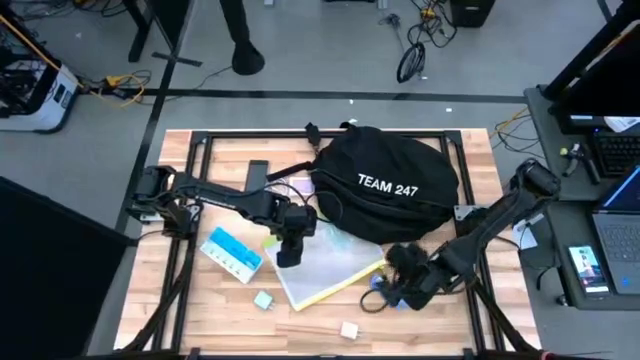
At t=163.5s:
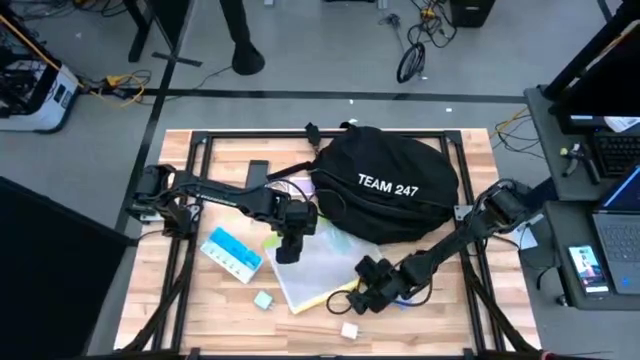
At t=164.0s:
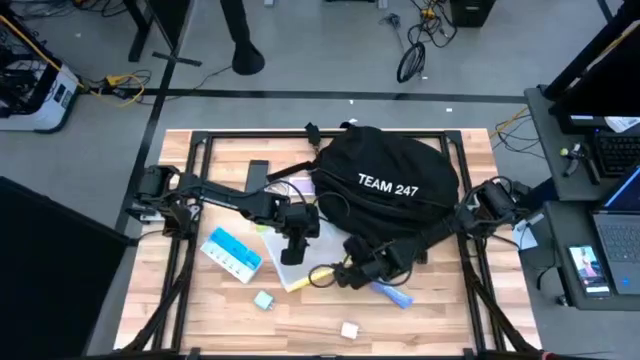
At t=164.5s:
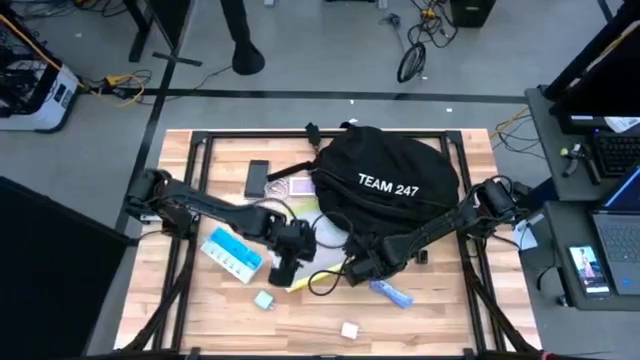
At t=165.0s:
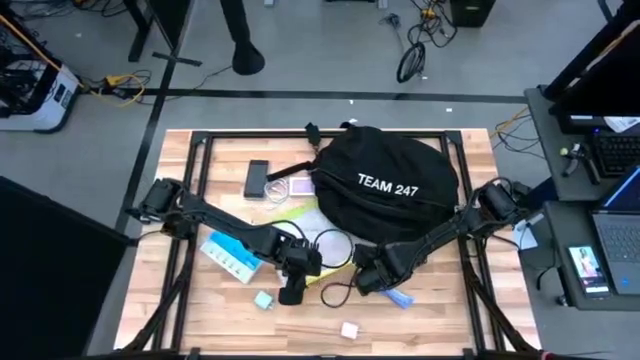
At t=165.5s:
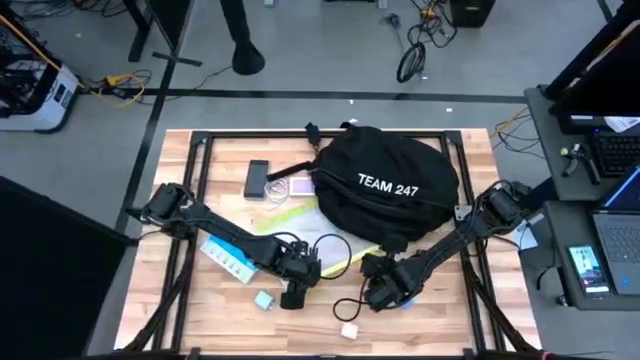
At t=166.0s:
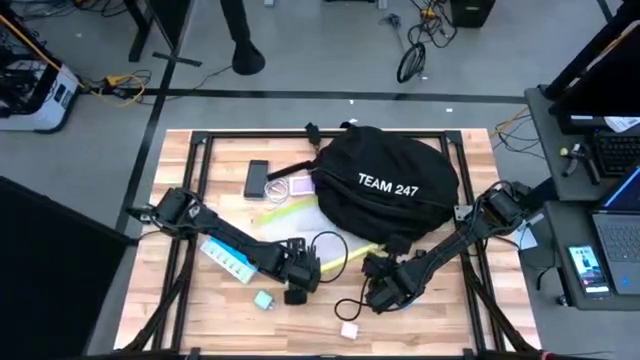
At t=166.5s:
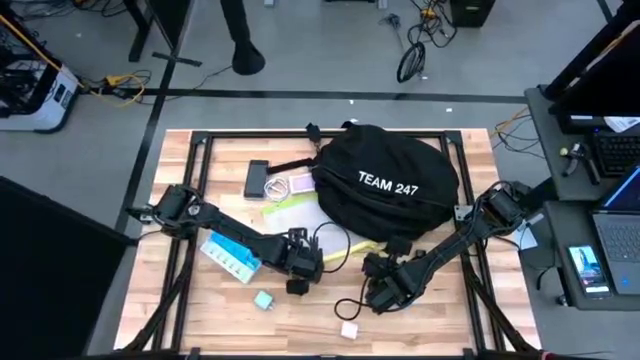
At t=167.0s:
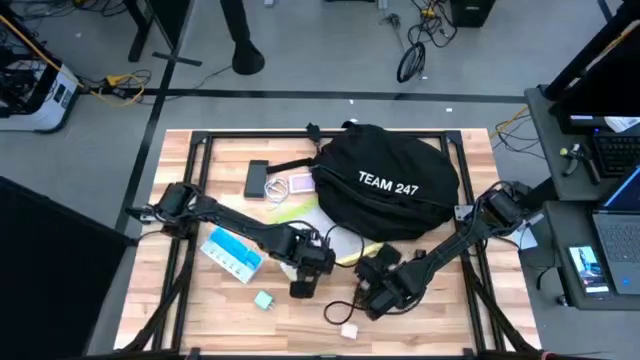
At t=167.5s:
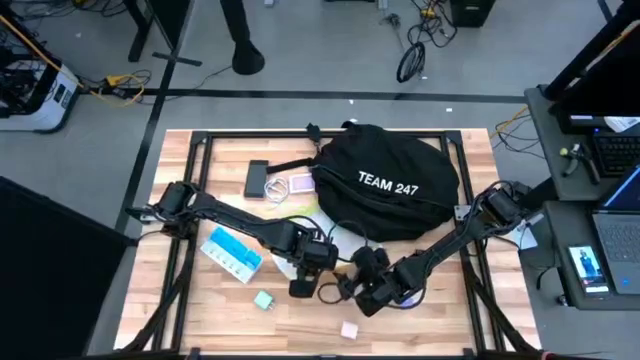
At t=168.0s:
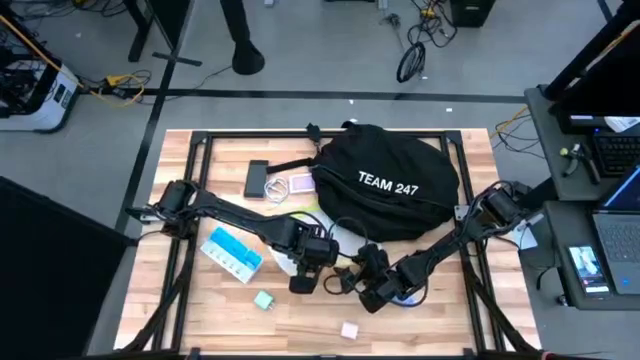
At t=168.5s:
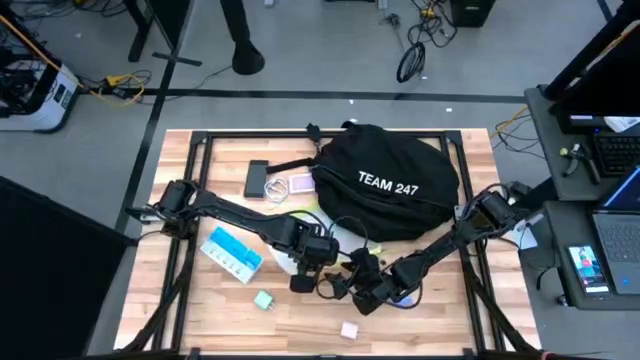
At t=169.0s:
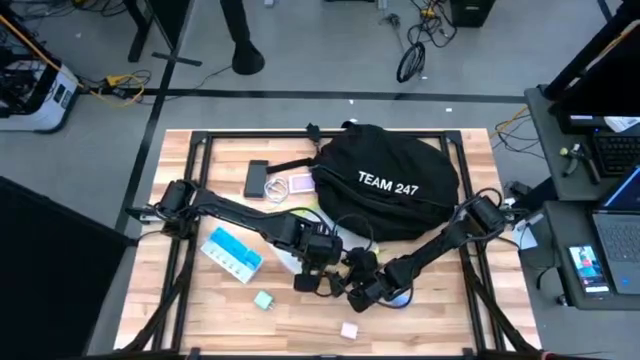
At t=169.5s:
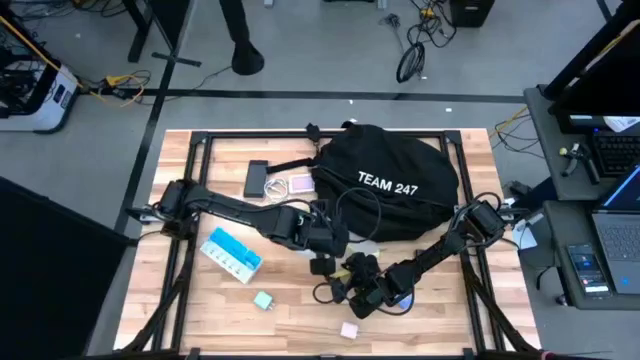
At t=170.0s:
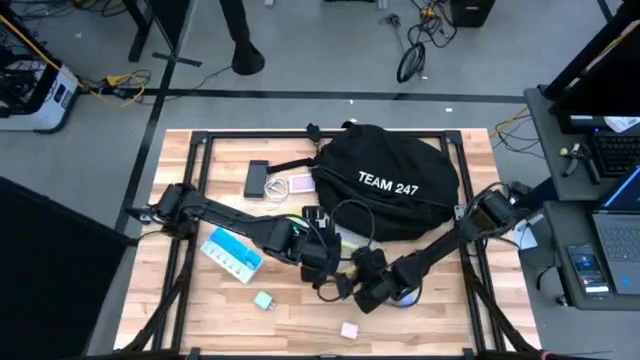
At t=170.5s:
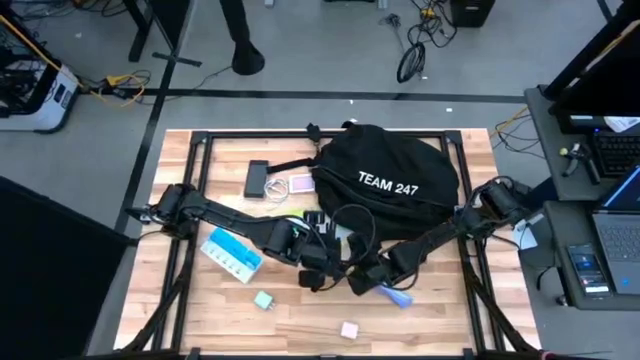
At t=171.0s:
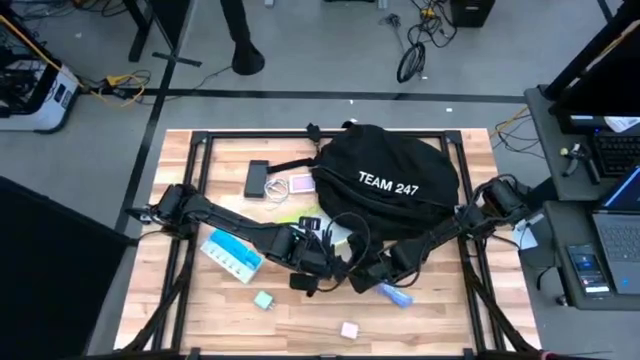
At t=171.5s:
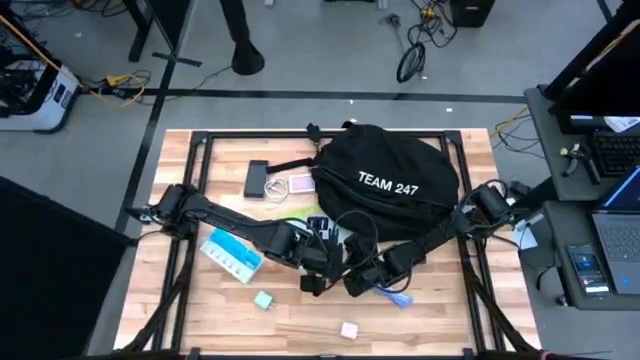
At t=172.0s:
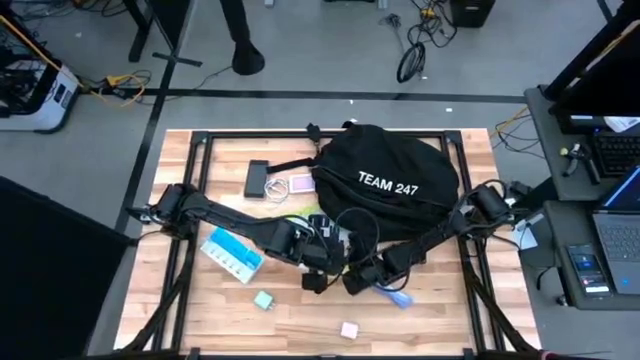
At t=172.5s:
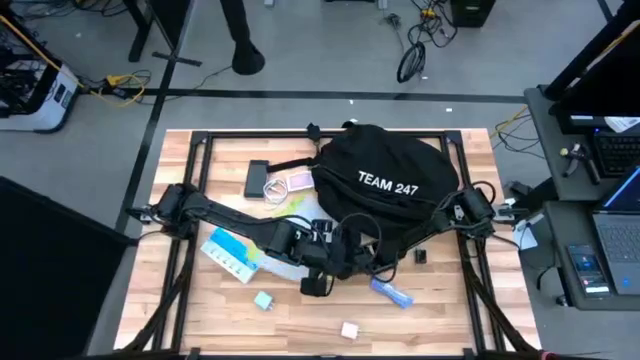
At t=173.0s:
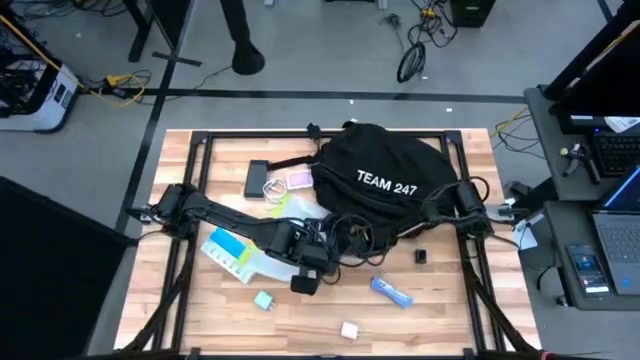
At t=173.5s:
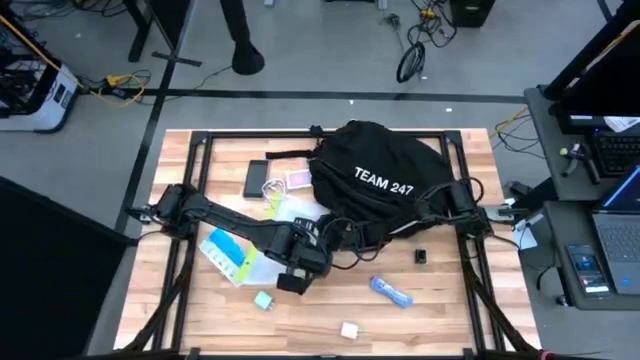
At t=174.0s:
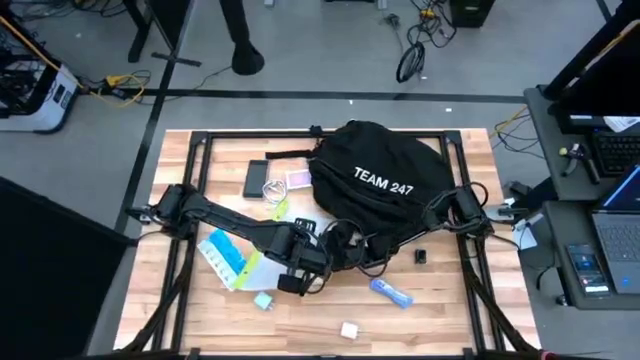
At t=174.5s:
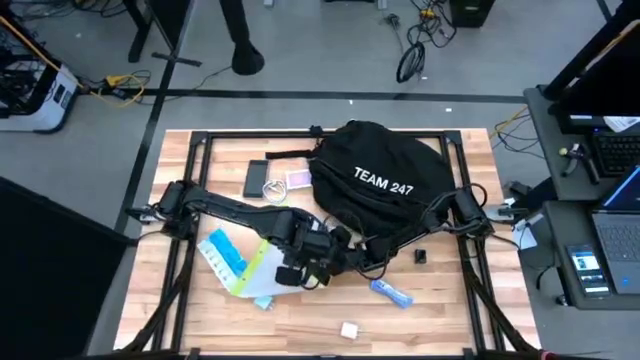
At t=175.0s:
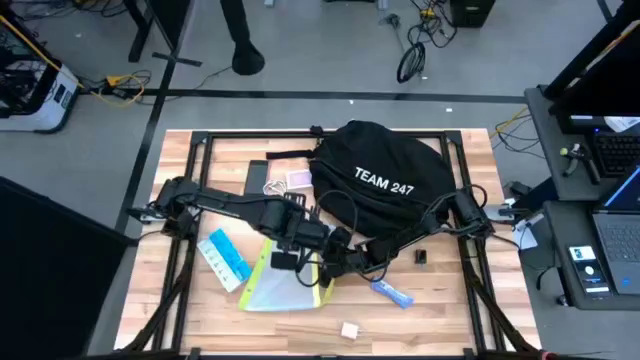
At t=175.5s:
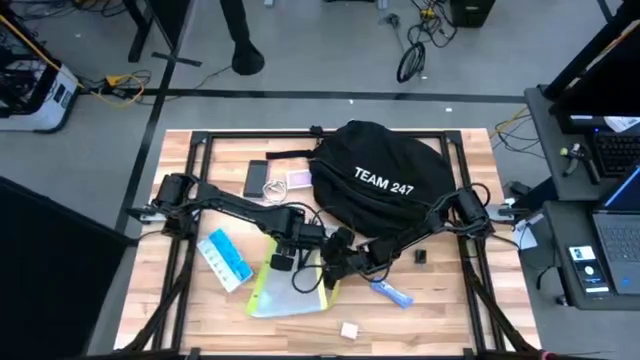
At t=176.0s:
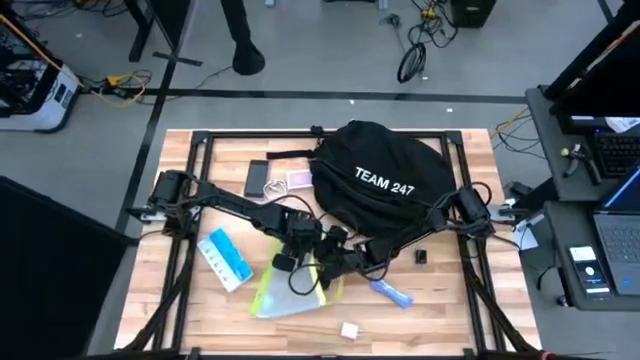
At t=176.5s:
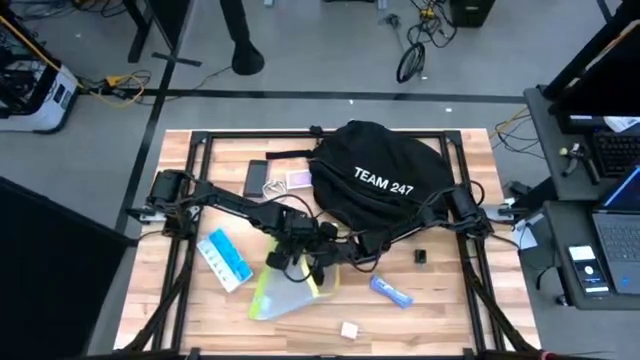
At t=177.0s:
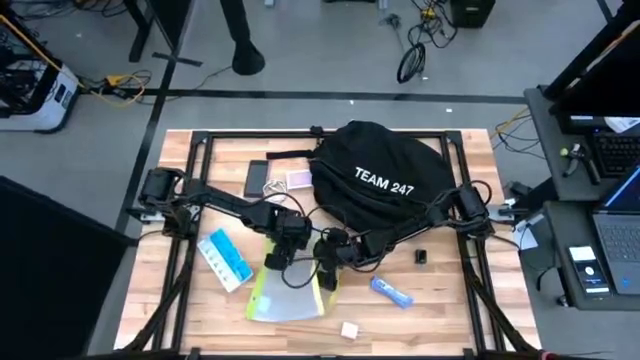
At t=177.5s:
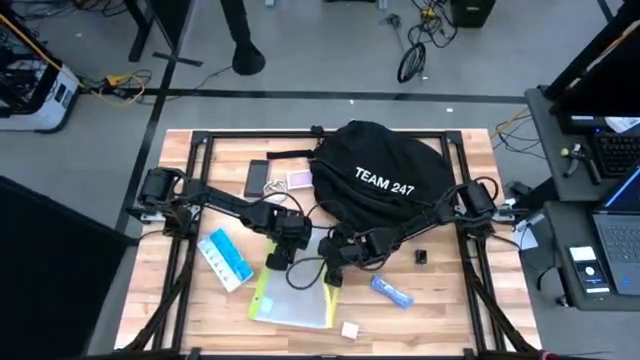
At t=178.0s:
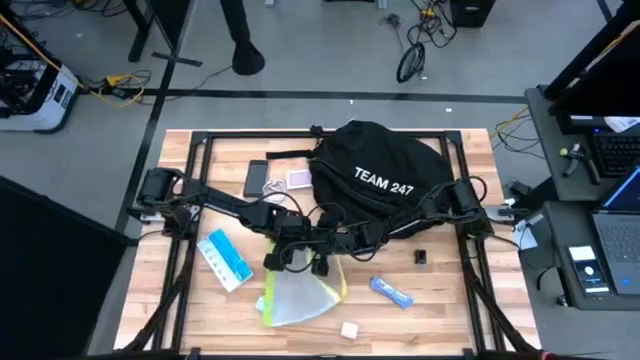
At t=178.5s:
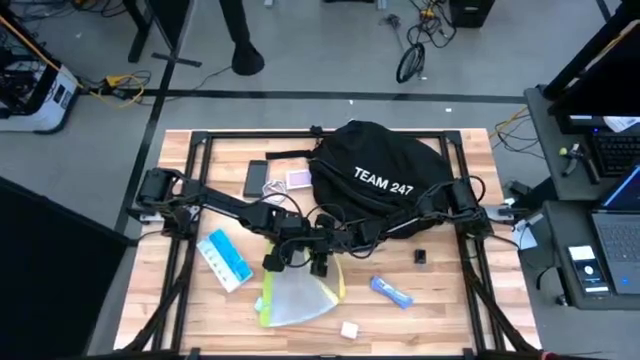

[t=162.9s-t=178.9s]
Task: Unpack backpack
Remove the earphones from the green zip bag

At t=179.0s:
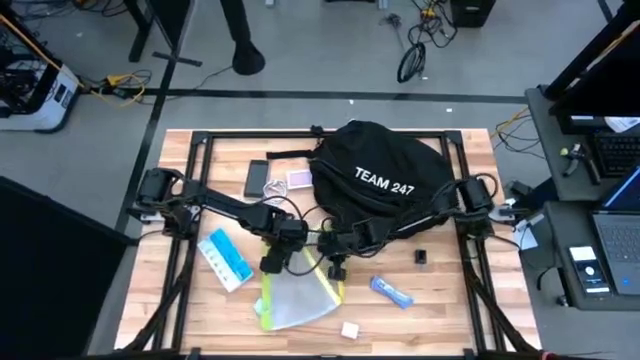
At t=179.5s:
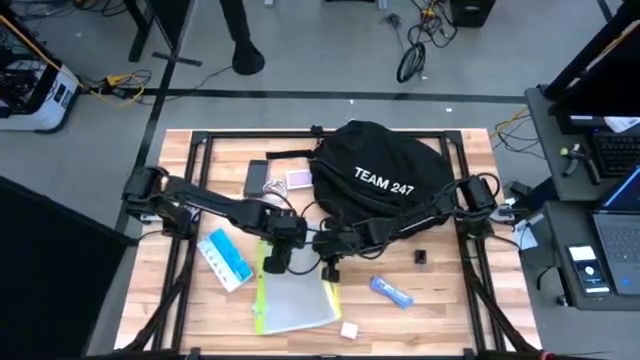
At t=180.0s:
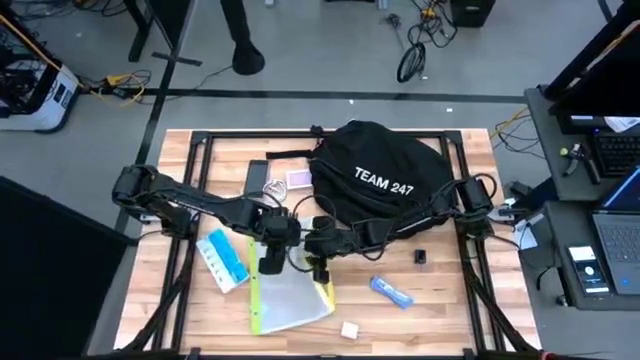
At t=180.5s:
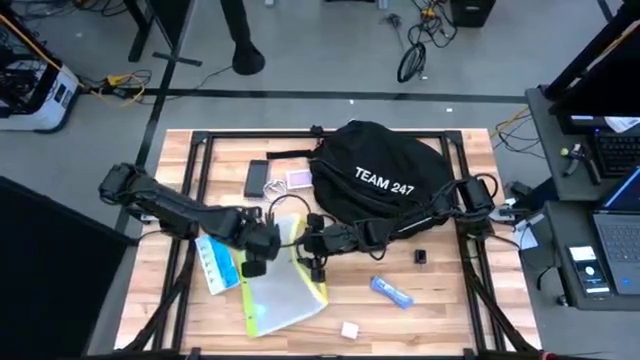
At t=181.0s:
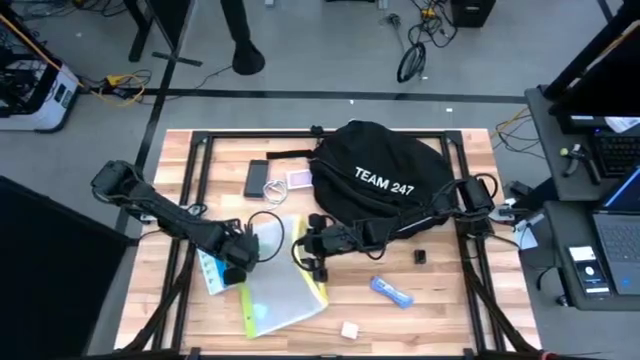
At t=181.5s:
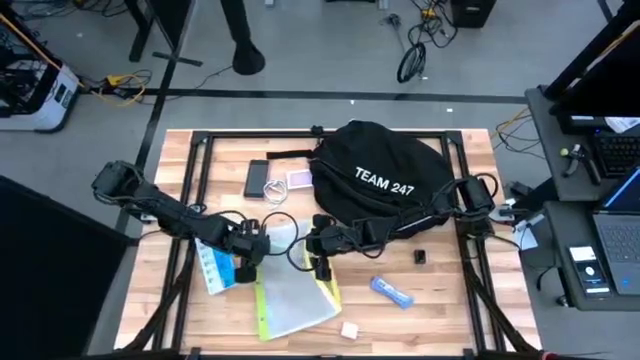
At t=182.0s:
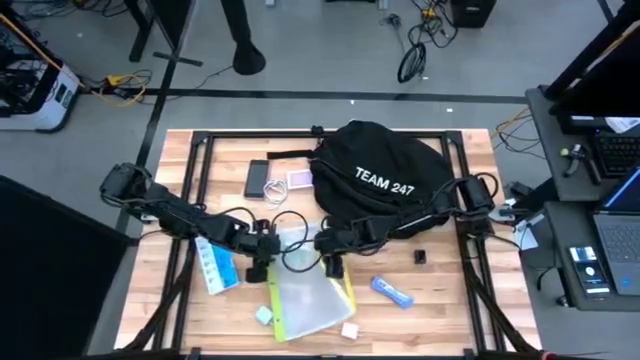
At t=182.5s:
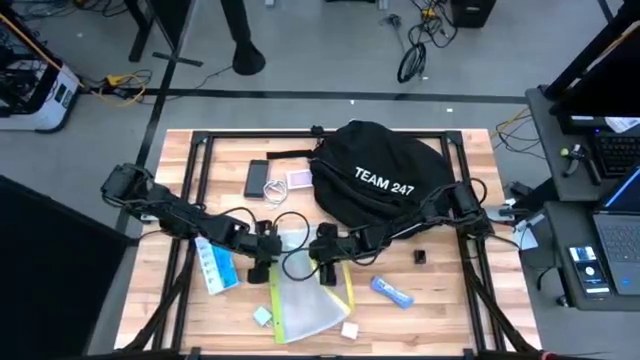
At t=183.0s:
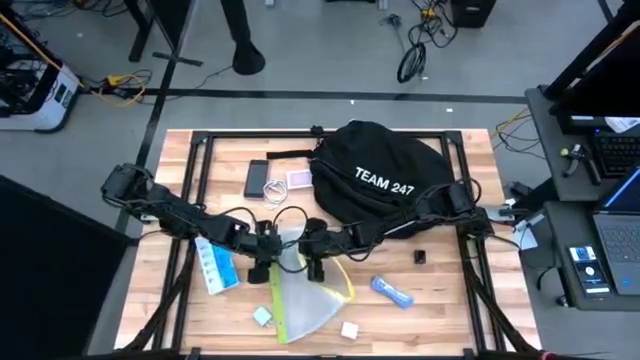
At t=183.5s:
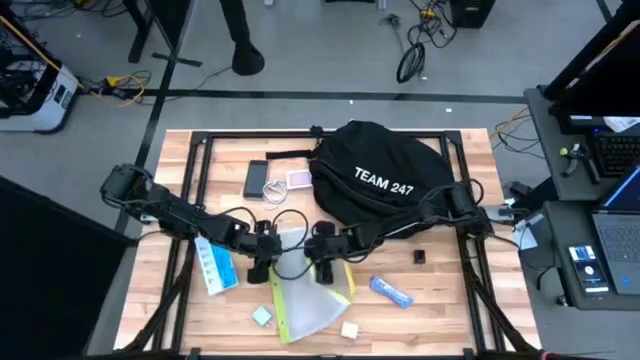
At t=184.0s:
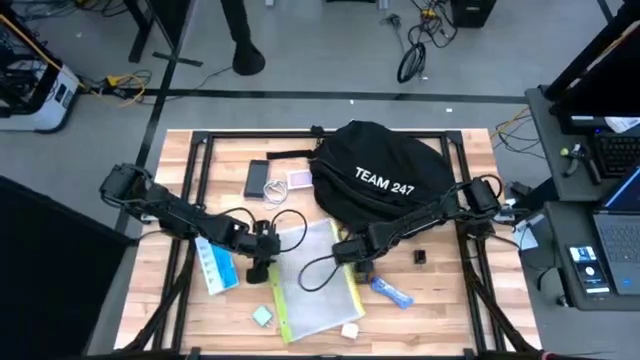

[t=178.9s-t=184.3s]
Remove the earphones from the green zip bag

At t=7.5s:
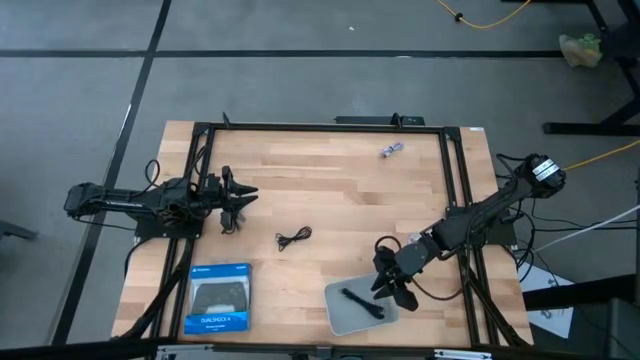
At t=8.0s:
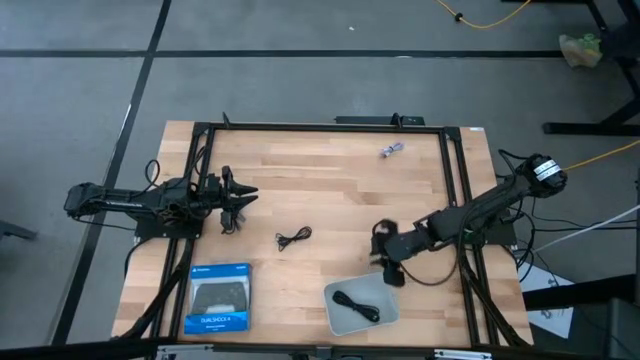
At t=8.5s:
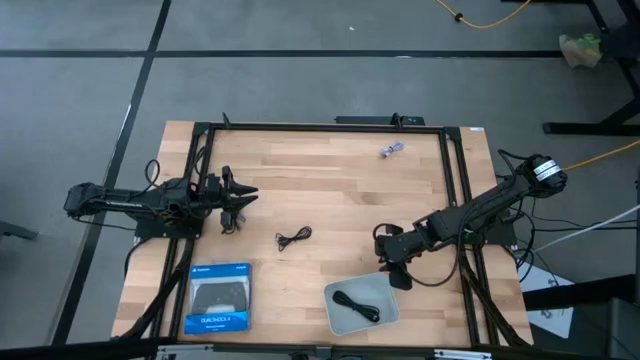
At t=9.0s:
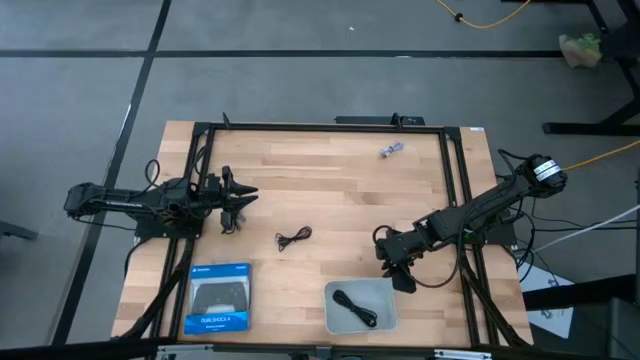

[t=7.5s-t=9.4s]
Task: Pick and place USB-C Cables
Adjust the white bin on the table
